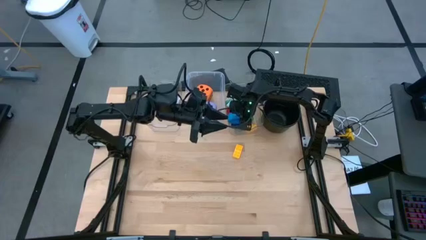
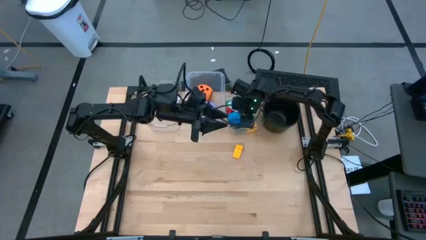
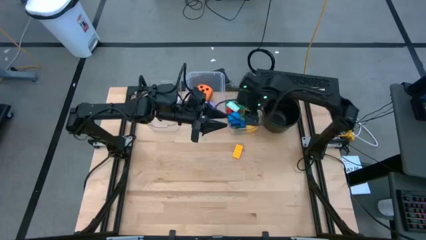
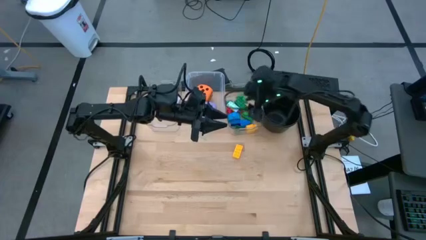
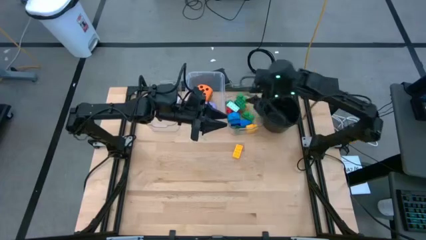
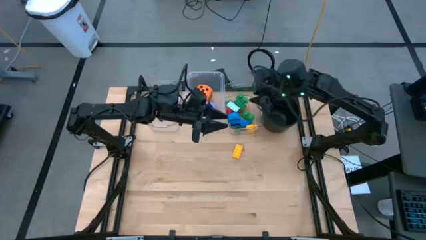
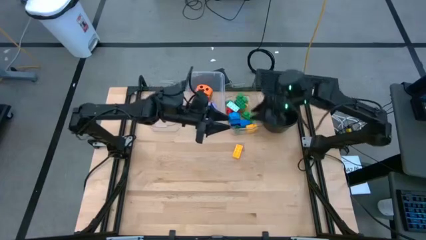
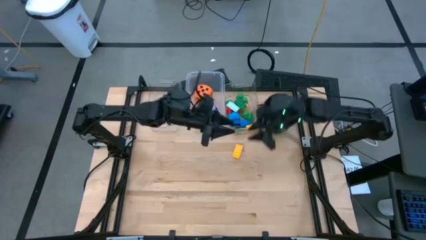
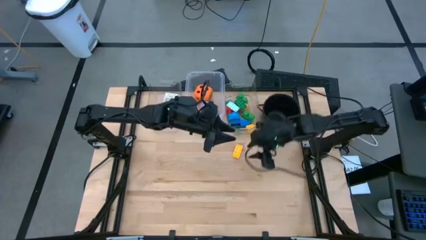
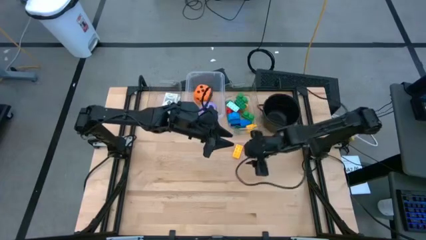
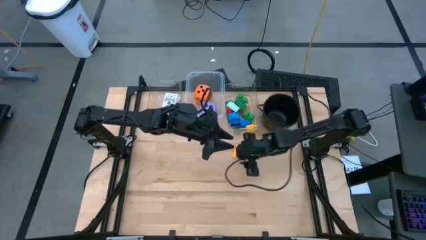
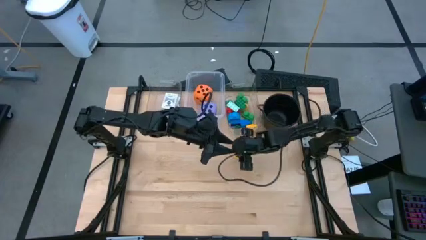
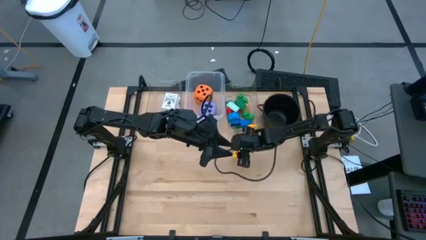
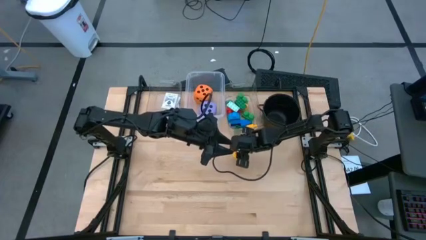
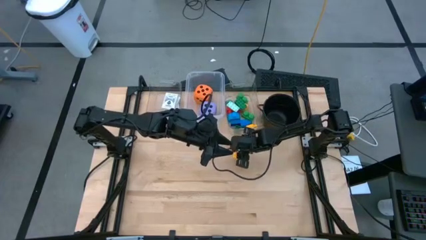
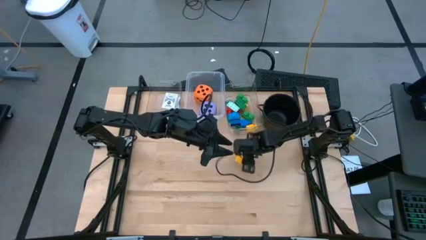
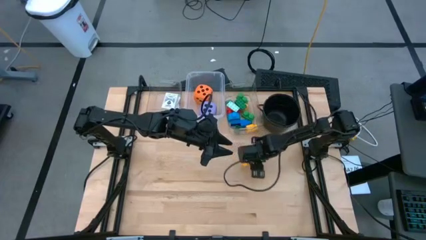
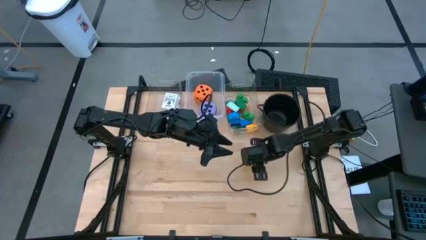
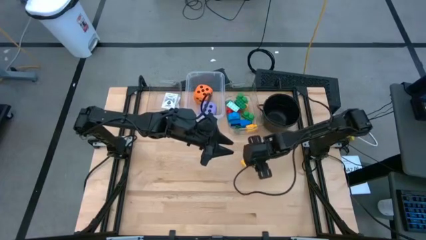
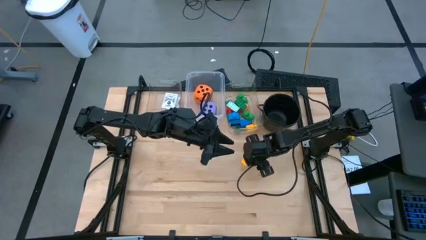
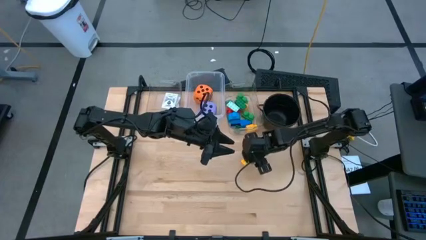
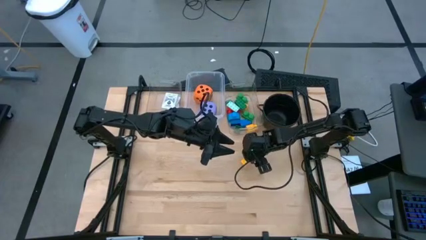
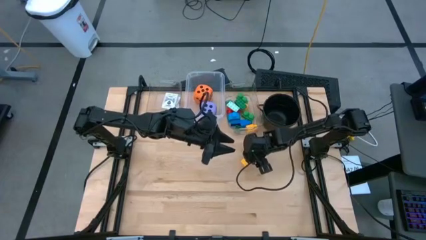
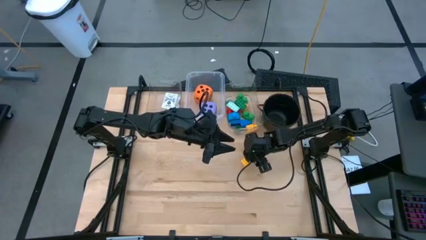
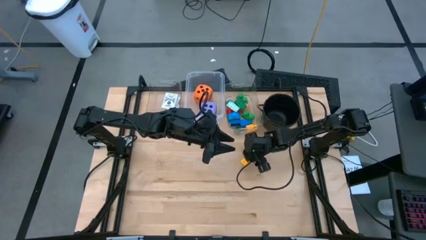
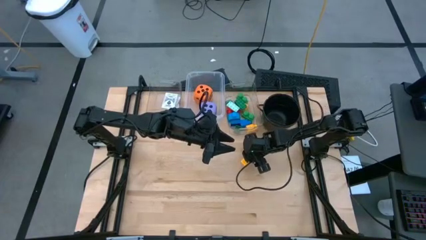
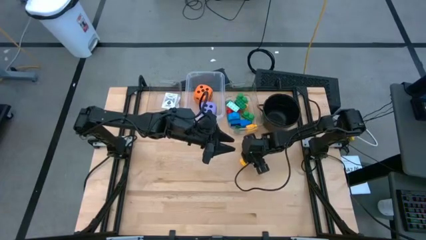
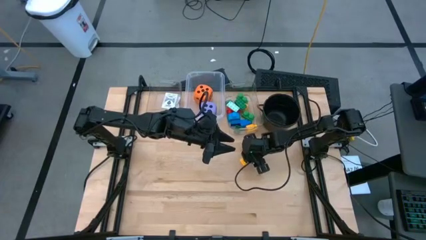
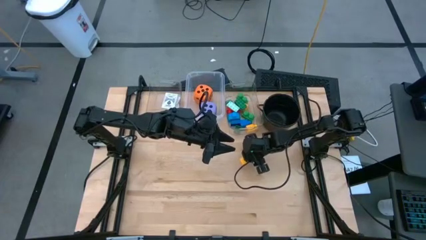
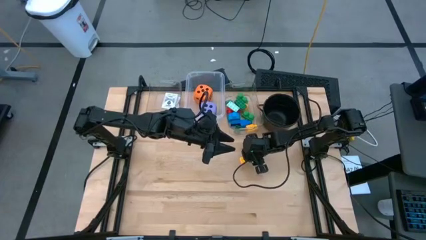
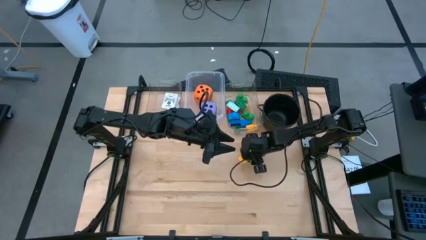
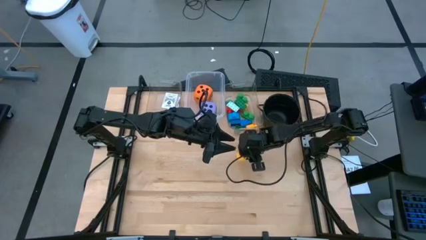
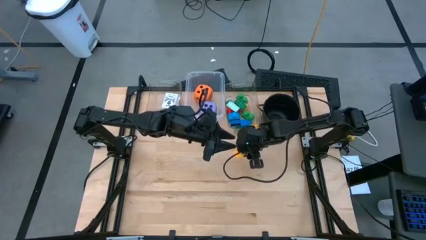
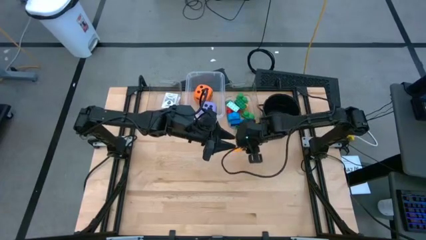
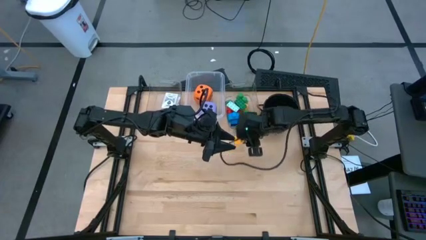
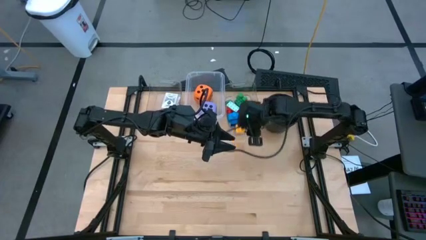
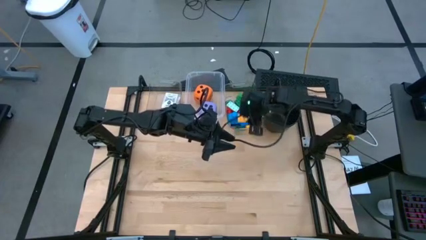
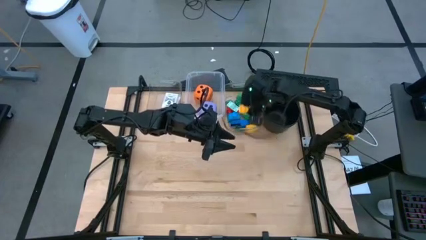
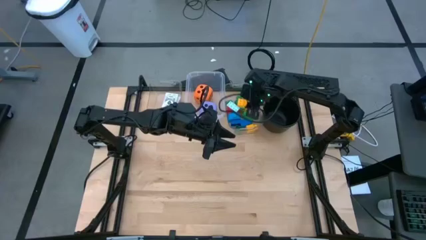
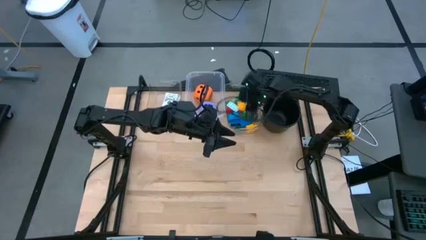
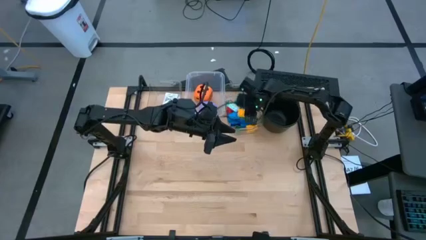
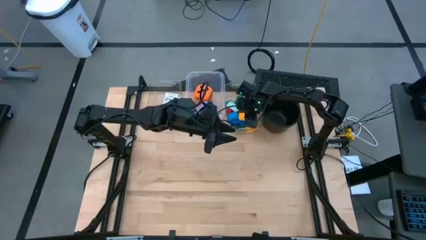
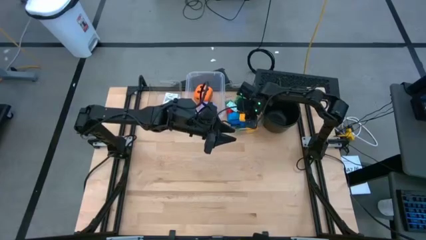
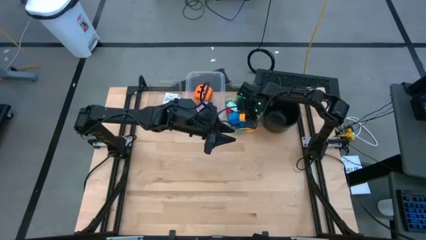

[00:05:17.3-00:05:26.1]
Task: Pick & Place Toys
Put the yellow game piece into the right transparent bin

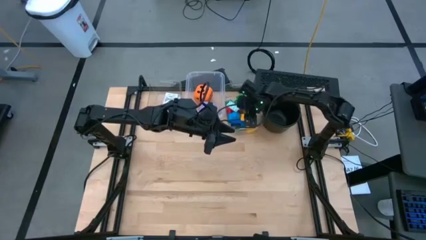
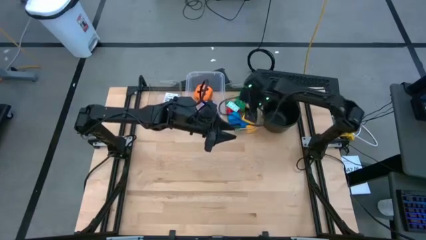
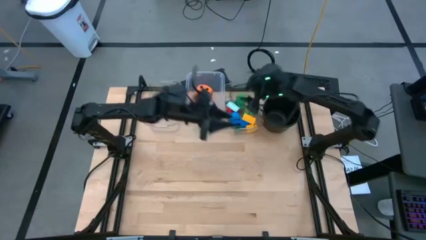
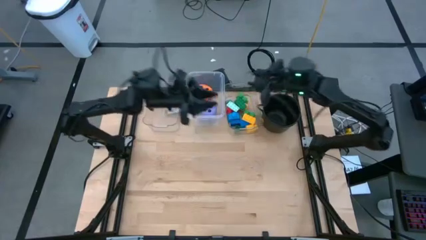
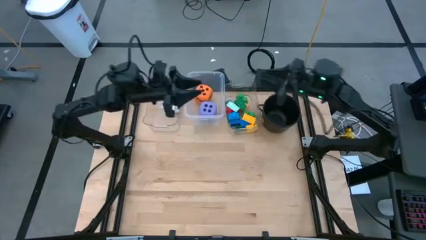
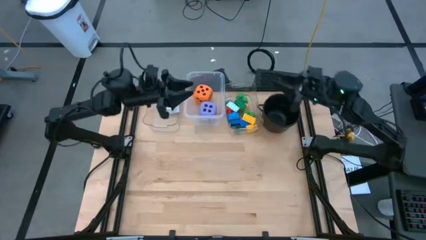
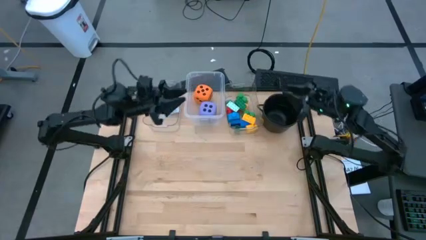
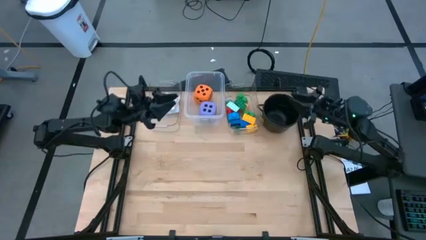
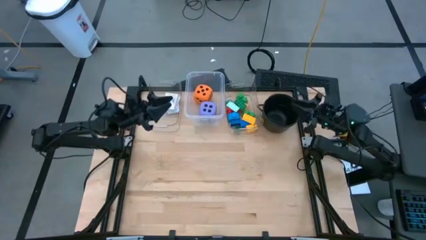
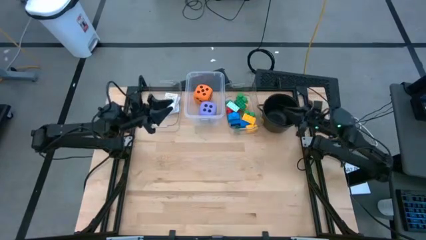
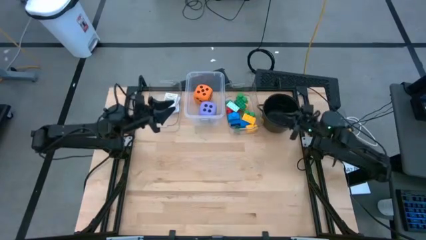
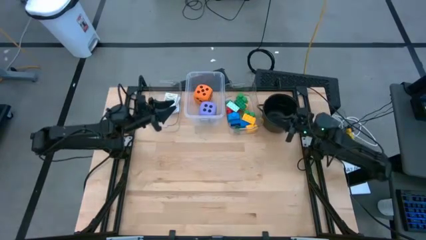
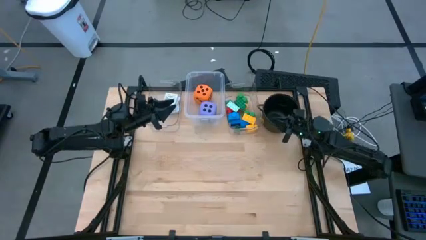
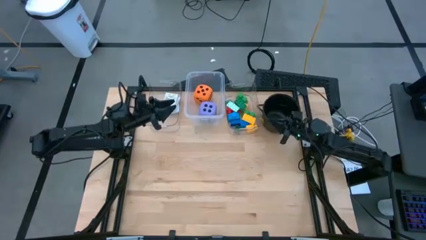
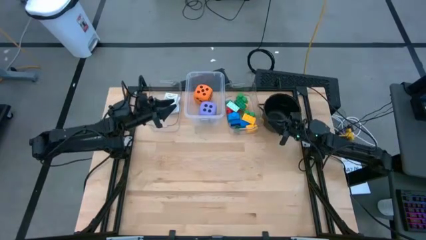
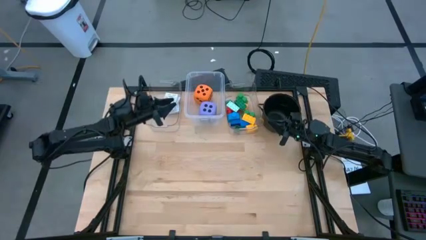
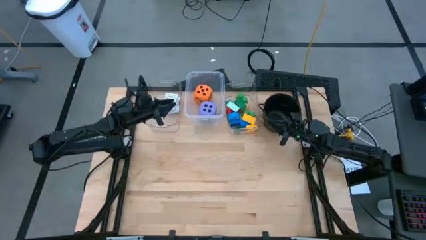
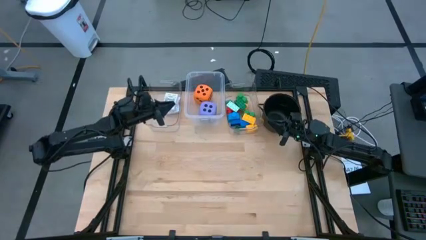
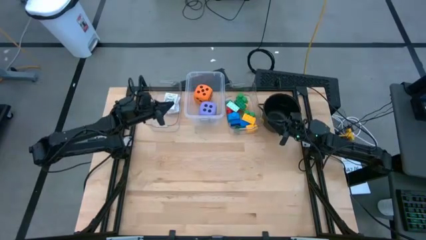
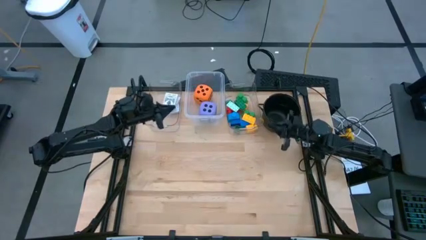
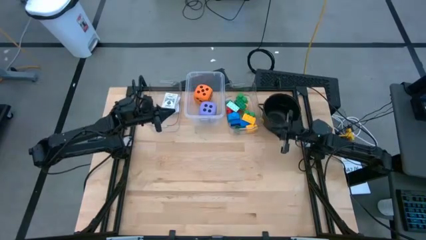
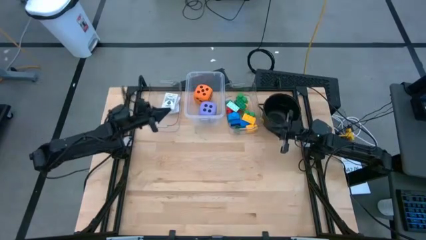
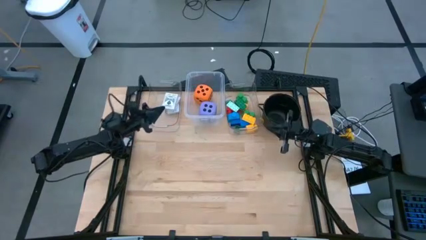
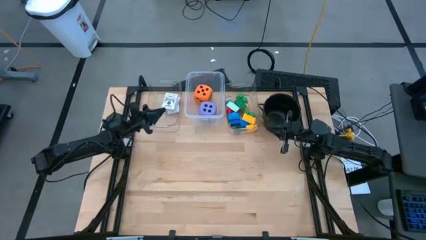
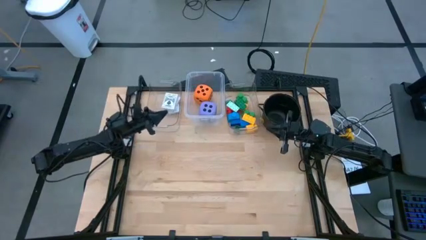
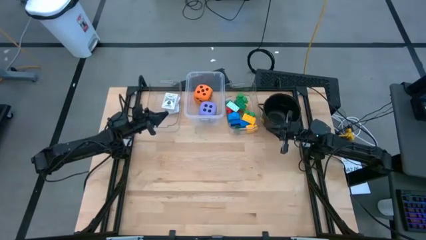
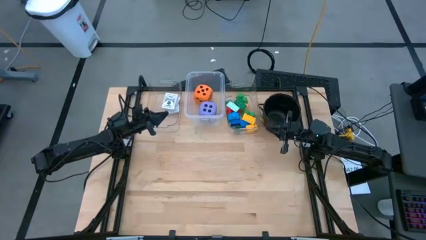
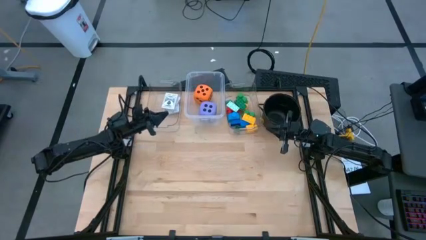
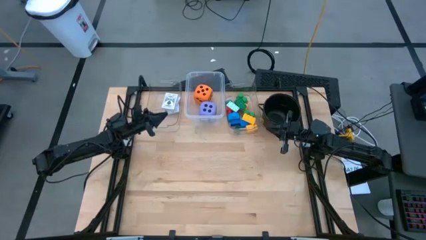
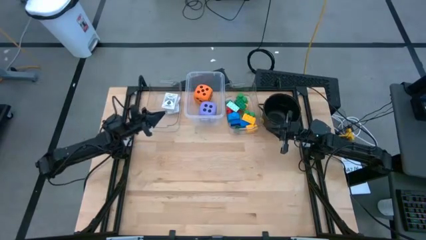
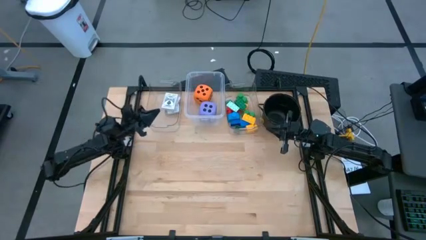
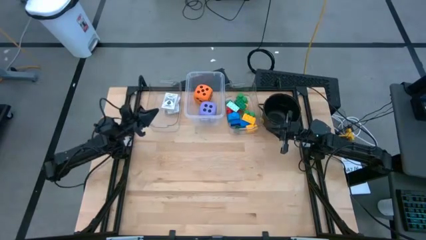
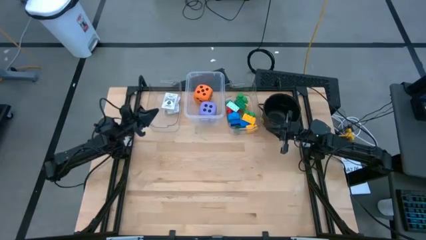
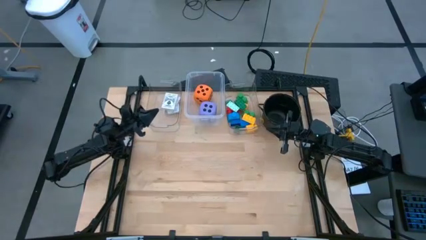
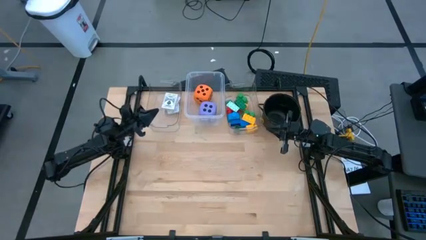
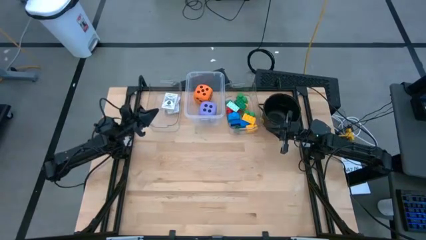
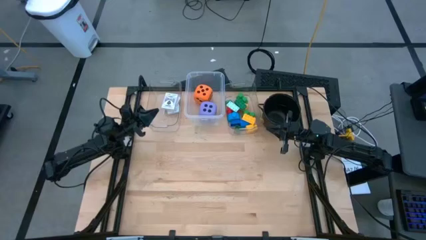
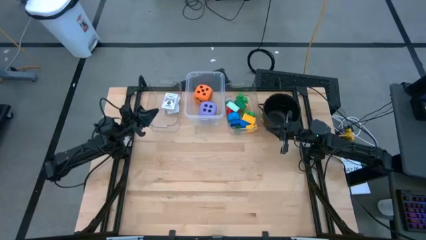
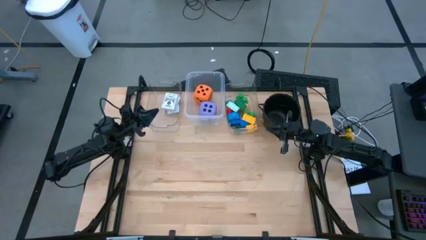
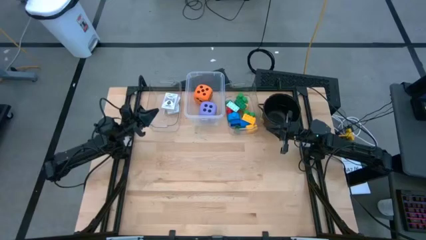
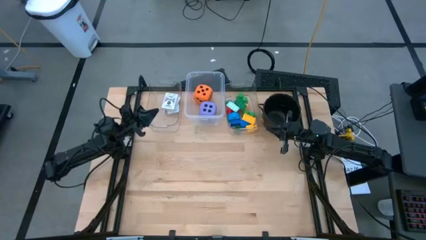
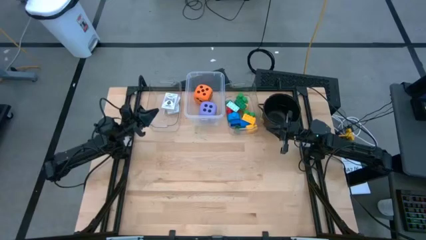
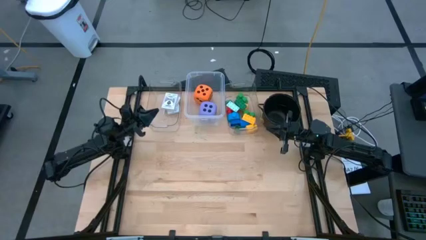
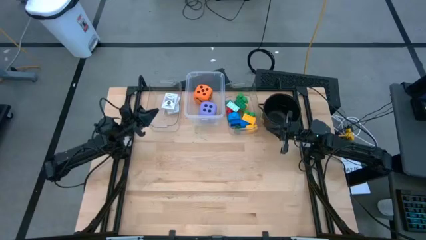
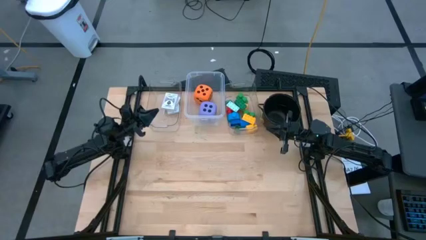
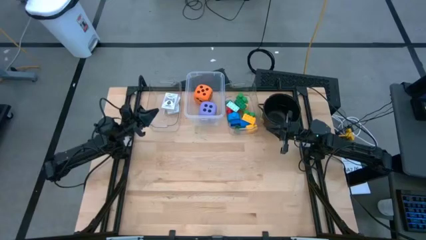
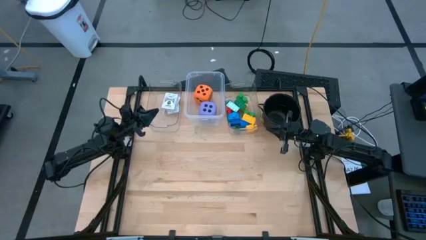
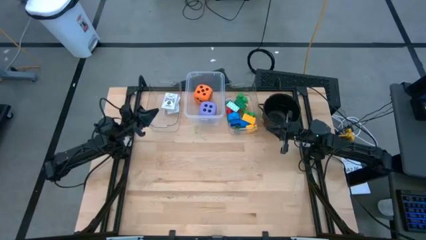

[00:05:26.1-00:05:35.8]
Return to Home Position
